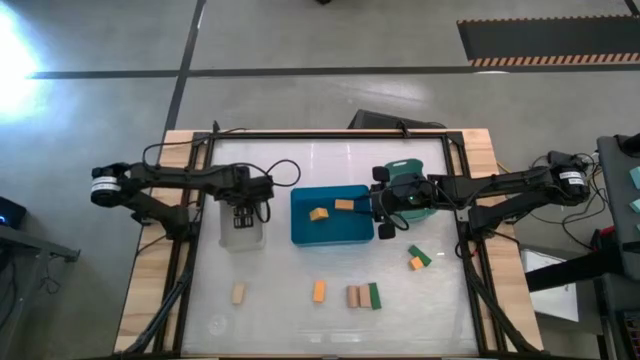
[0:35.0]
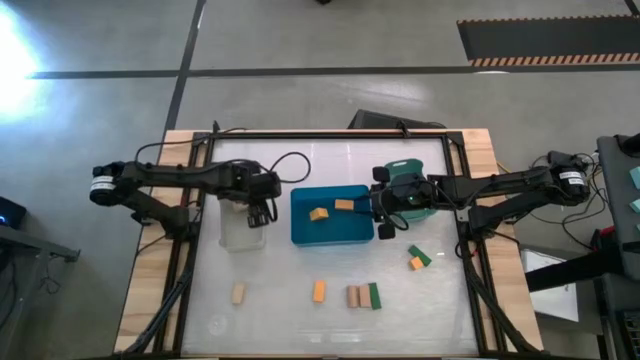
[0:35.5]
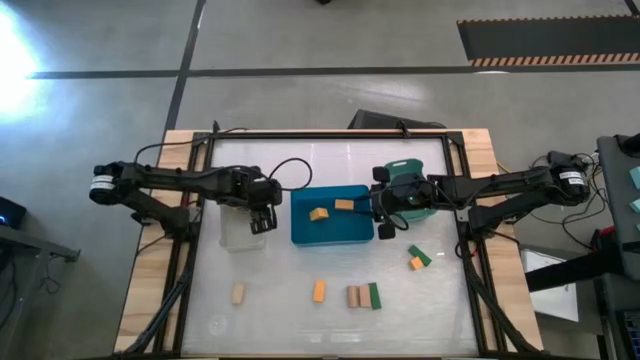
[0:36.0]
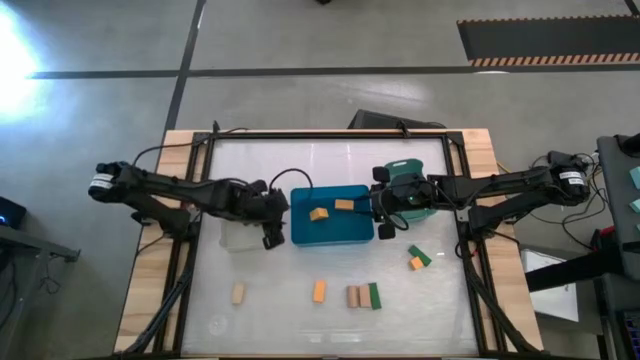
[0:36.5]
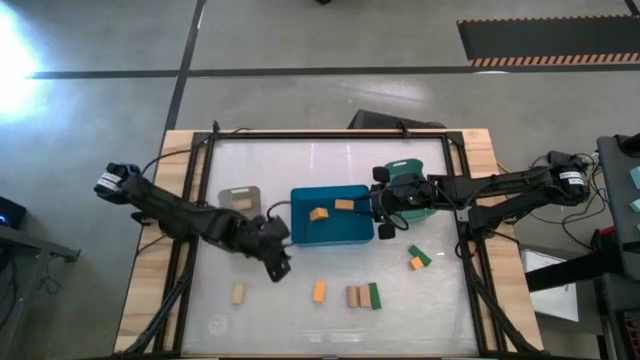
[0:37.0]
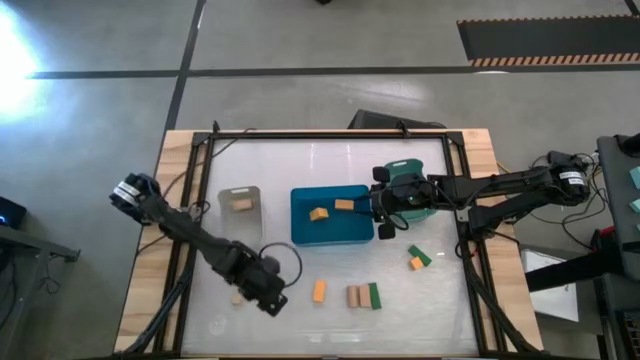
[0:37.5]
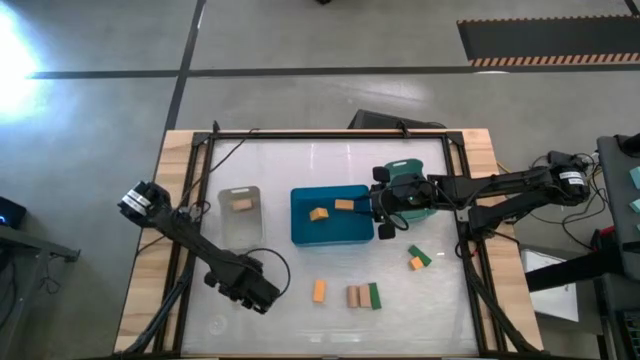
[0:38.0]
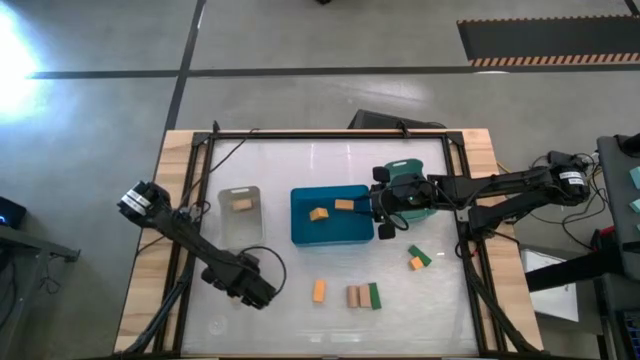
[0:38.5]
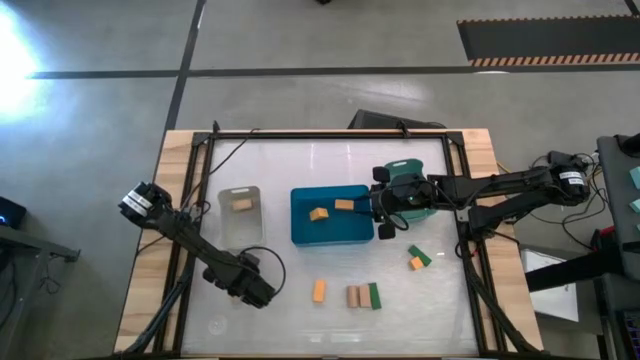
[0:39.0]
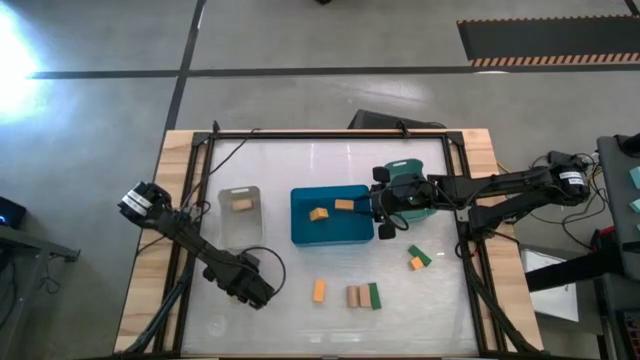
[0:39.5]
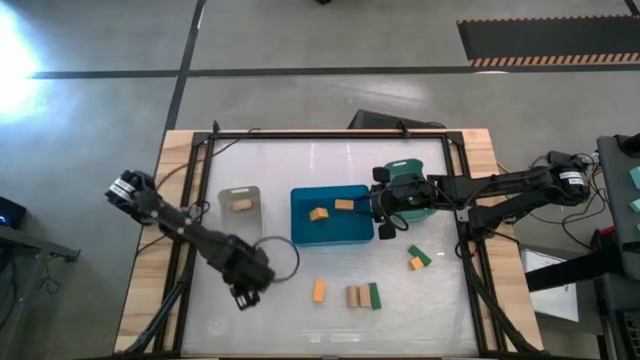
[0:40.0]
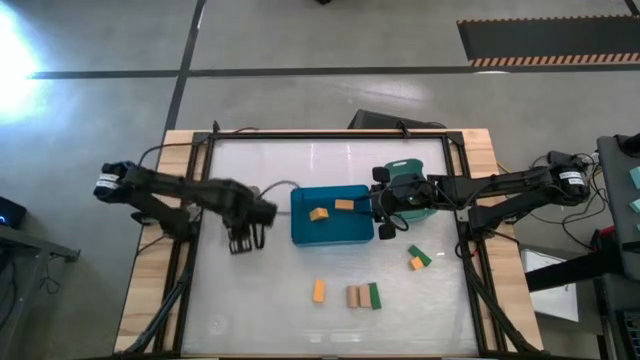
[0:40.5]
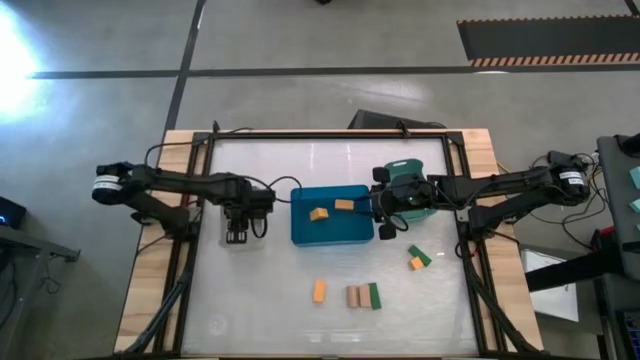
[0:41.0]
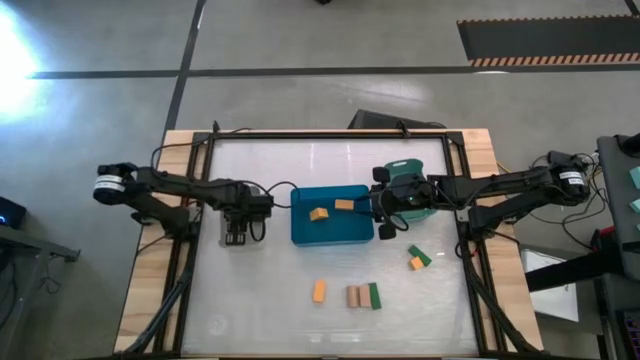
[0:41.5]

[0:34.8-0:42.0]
Task: Sort & place blocks by color
Put the brown block into the gray bin

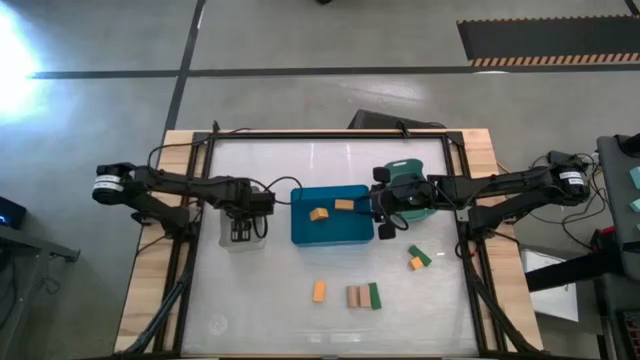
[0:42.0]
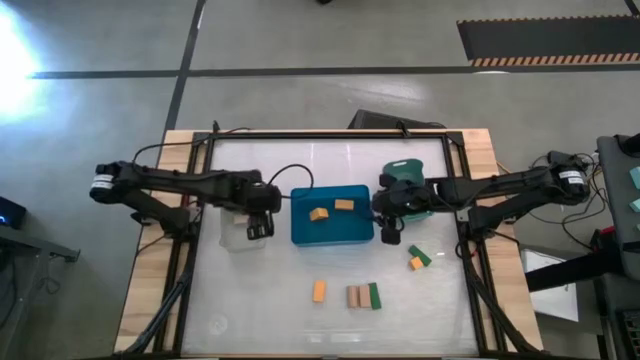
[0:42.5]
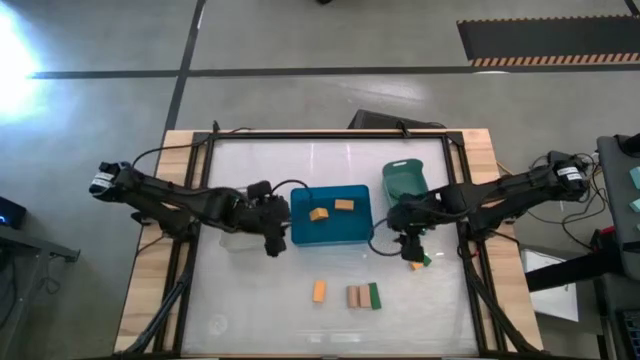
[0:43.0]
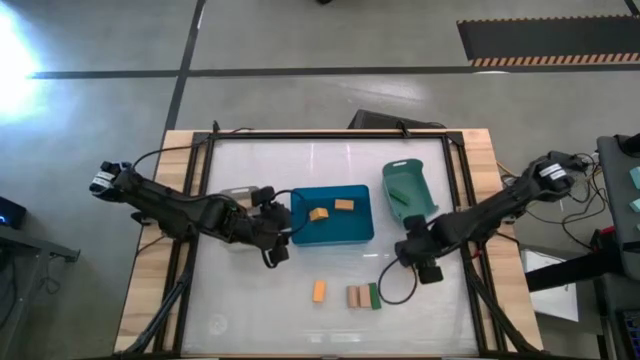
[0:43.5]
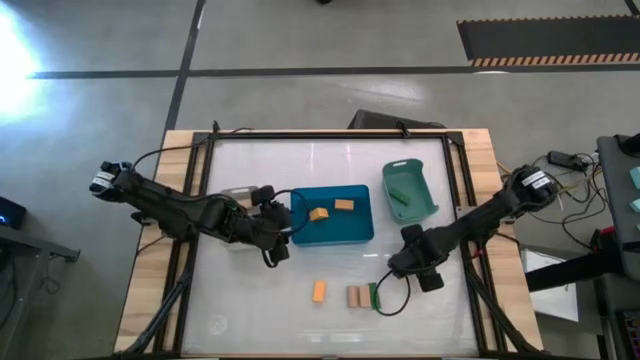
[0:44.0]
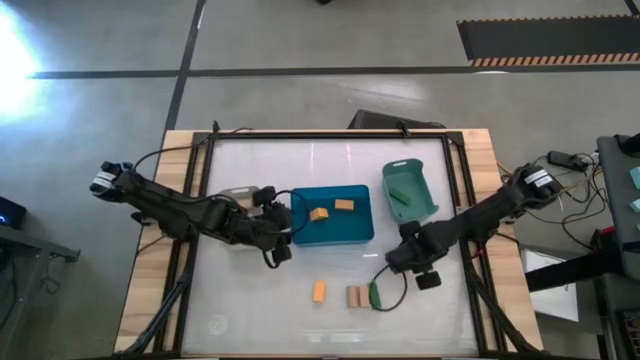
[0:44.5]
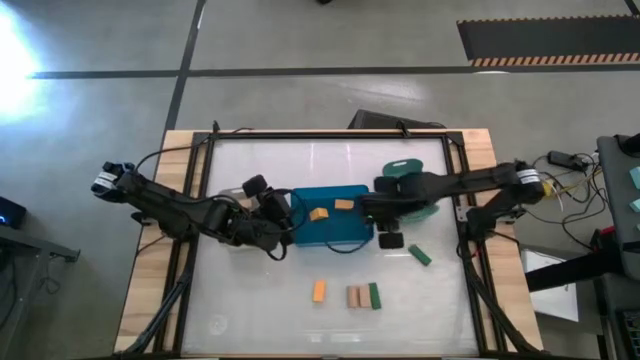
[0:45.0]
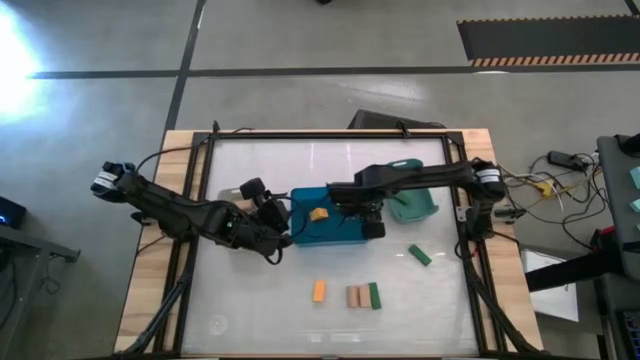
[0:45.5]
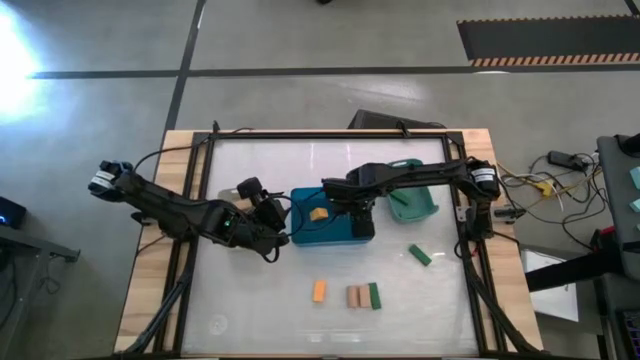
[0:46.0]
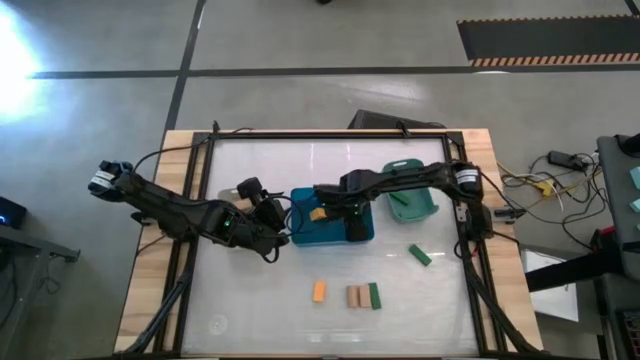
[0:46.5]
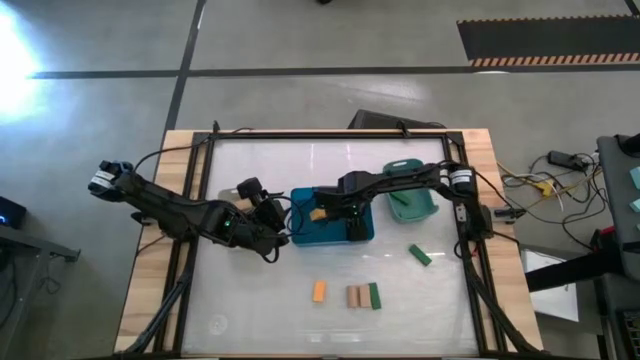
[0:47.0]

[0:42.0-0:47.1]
Put the yellow block into the blue bin

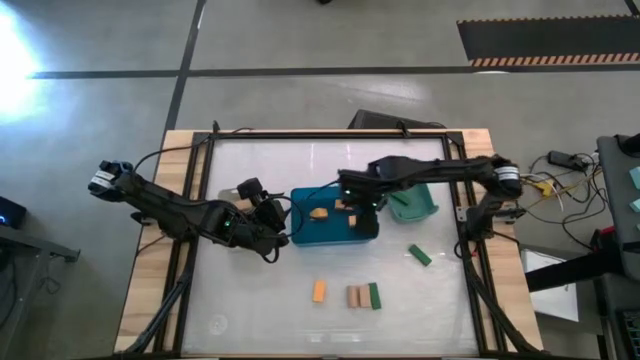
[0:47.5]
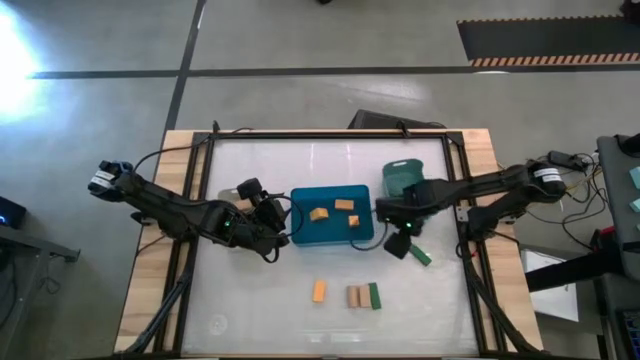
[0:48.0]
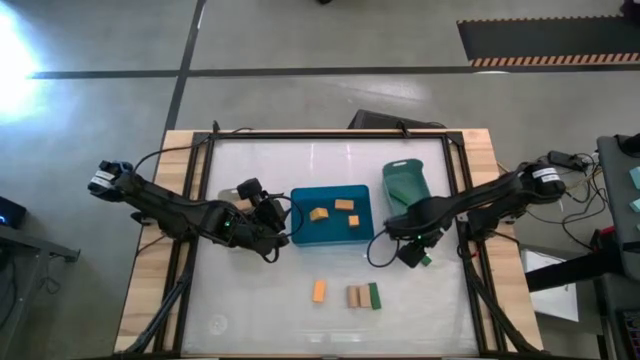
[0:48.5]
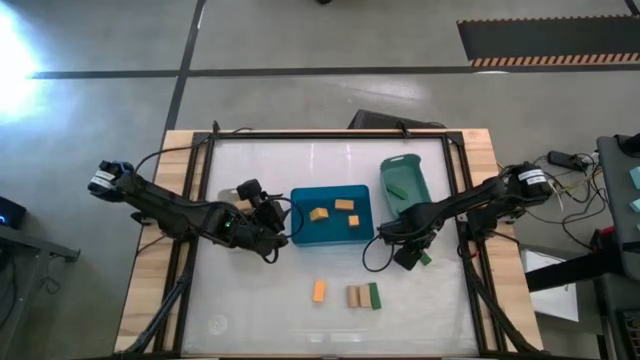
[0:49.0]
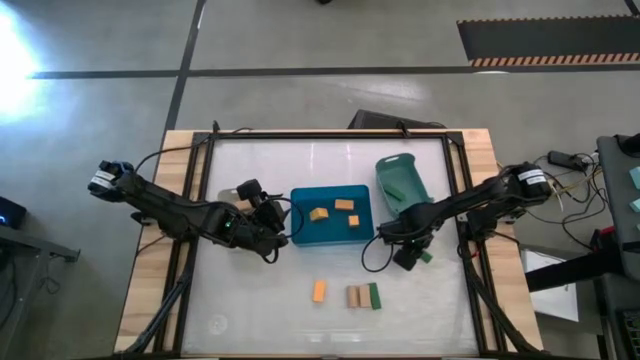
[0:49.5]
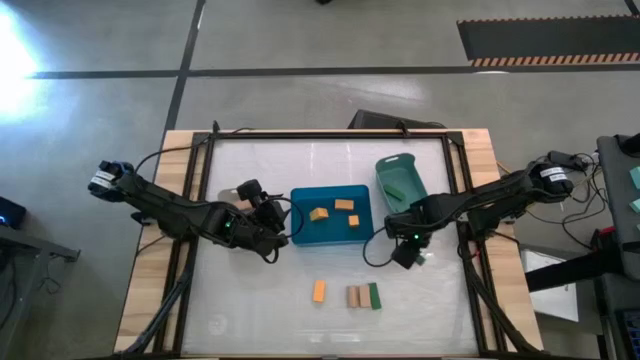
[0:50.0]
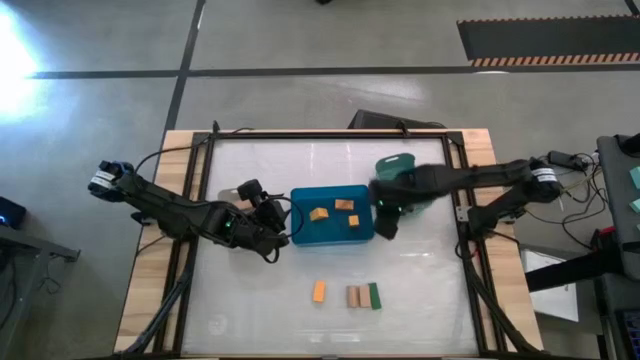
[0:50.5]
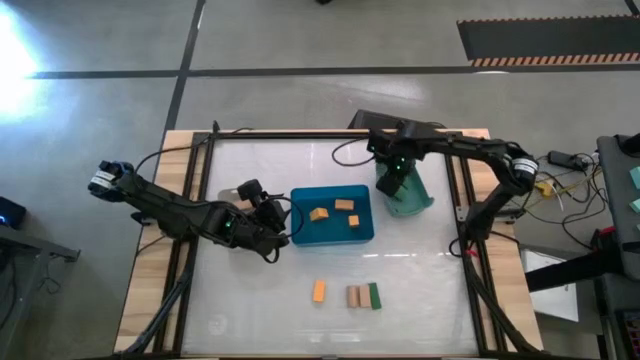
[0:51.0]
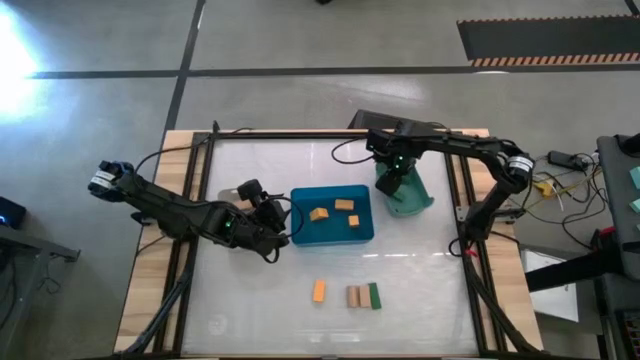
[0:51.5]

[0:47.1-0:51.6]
Put the green block into the teal bin

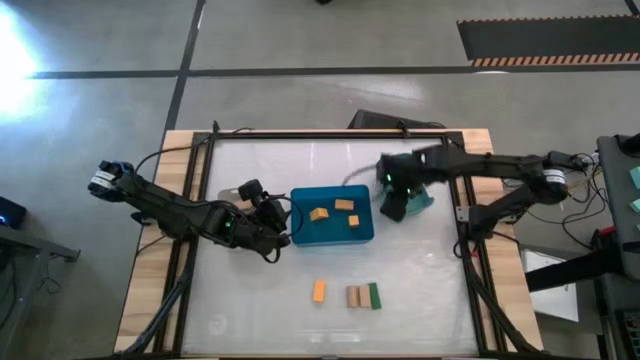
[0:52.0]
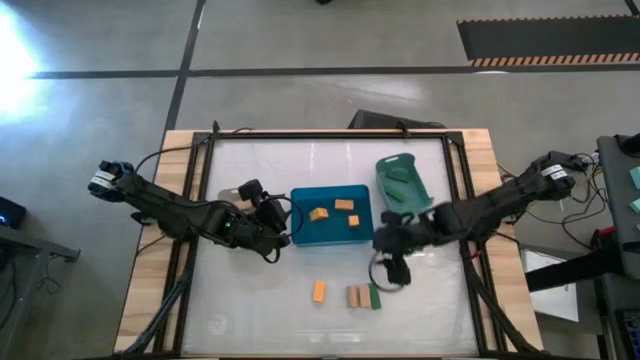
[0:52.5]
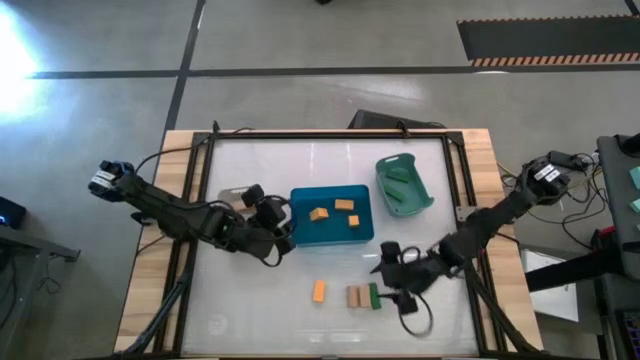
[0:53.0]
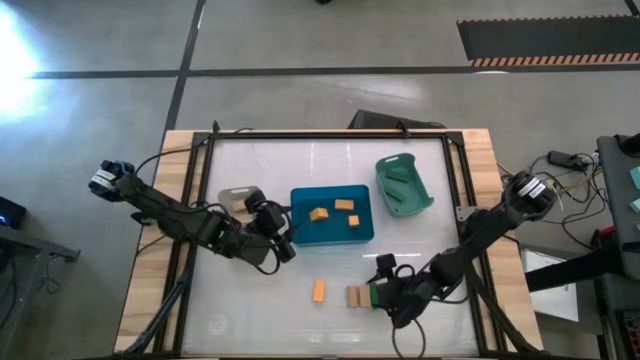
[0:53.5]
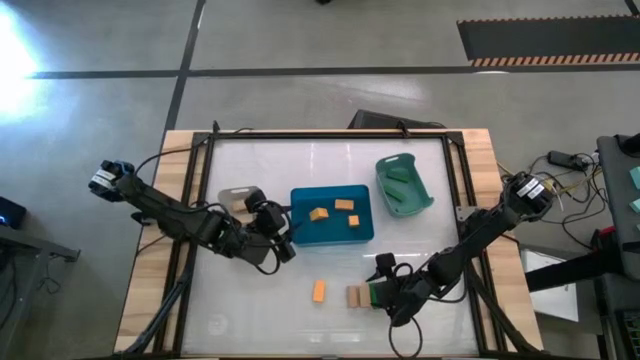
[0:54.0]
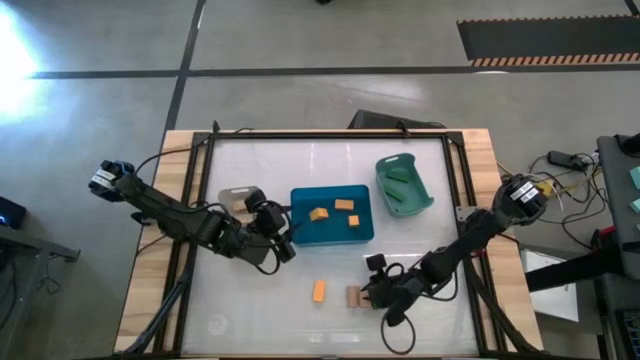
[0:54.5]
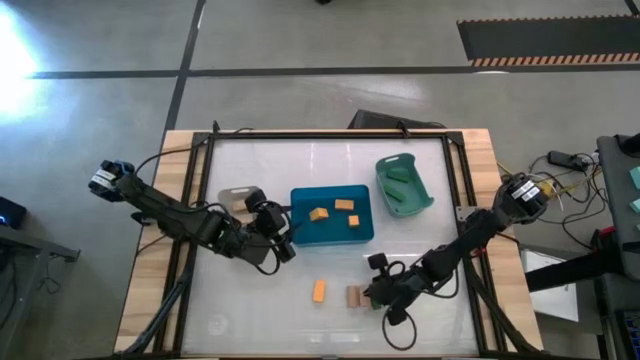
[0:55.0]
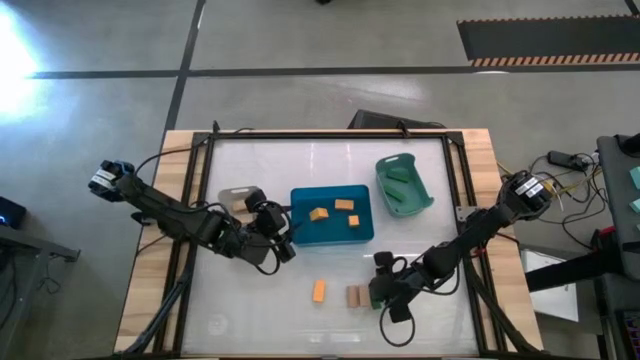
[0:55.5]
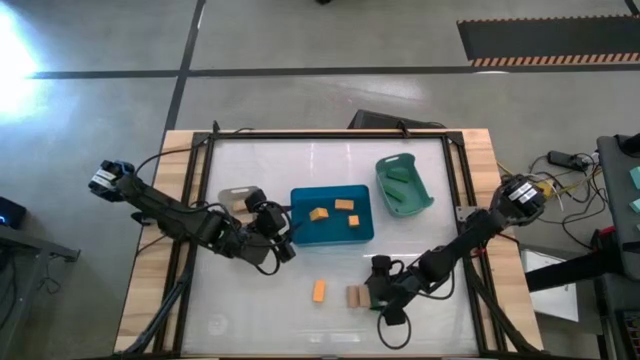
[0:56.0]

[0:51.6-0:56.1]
Put the brown block into the gray bin
